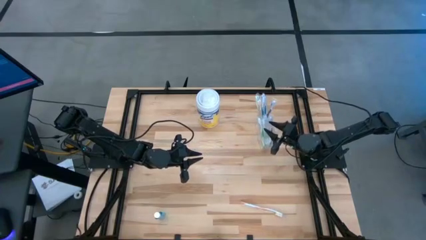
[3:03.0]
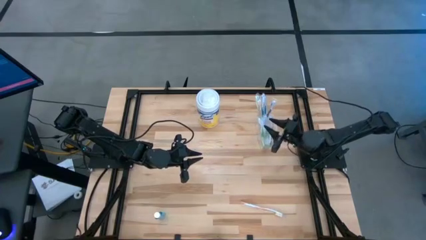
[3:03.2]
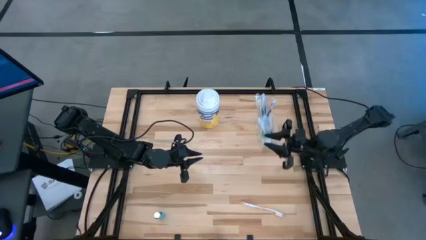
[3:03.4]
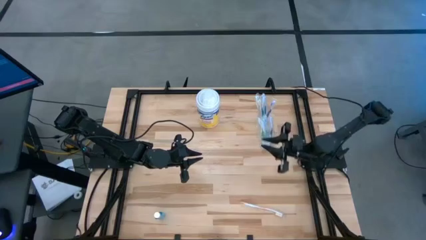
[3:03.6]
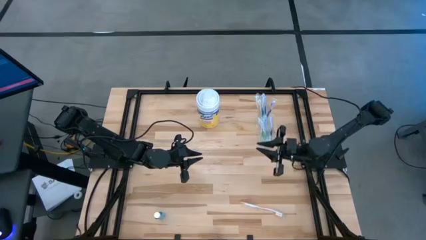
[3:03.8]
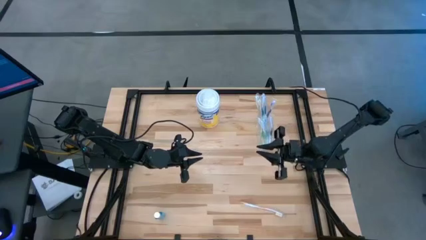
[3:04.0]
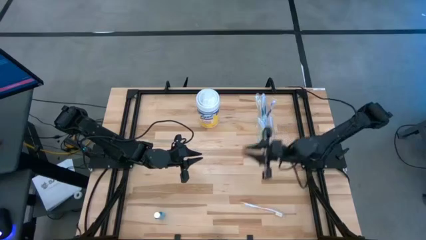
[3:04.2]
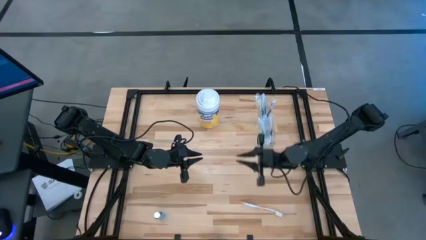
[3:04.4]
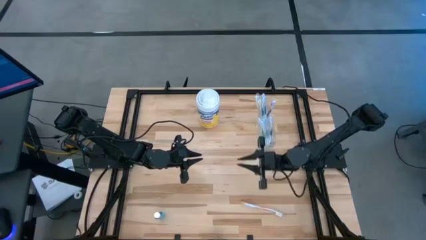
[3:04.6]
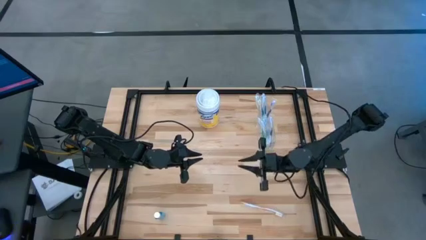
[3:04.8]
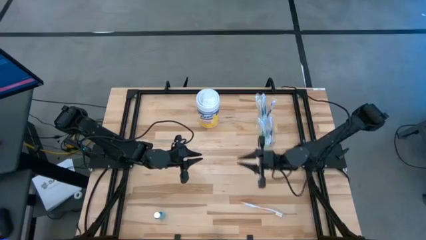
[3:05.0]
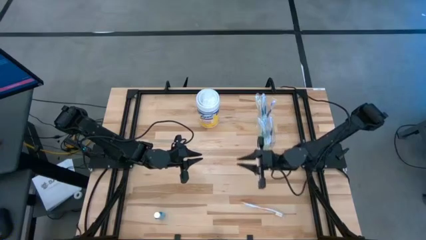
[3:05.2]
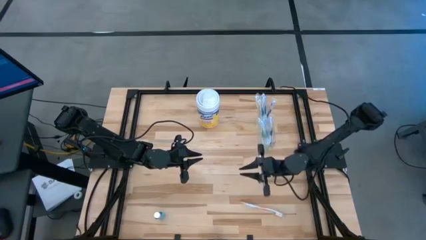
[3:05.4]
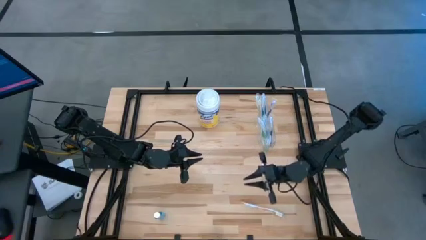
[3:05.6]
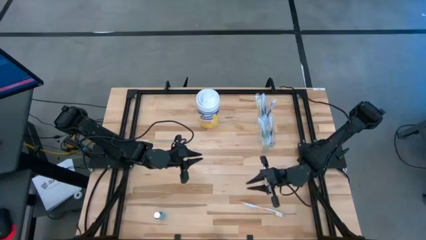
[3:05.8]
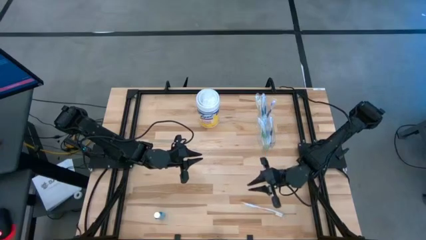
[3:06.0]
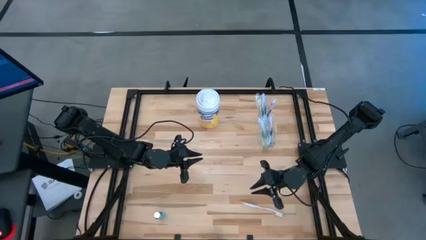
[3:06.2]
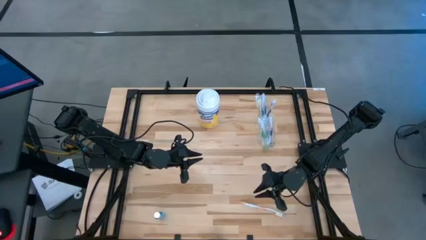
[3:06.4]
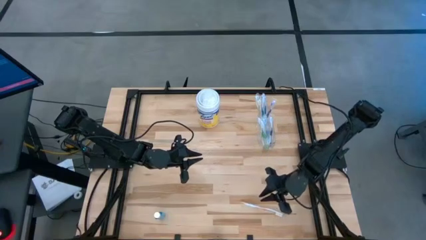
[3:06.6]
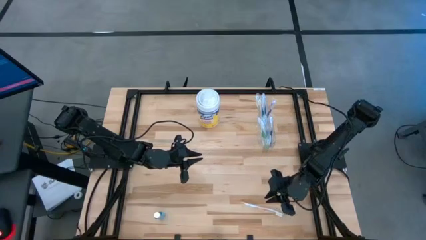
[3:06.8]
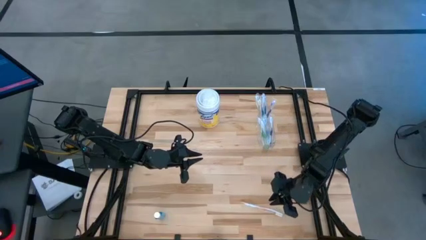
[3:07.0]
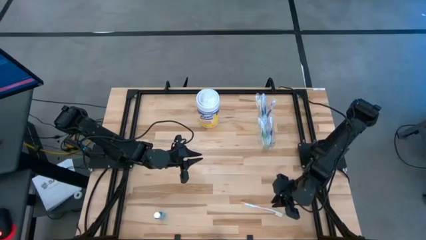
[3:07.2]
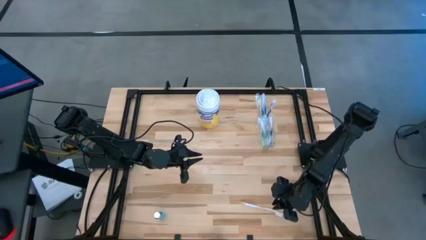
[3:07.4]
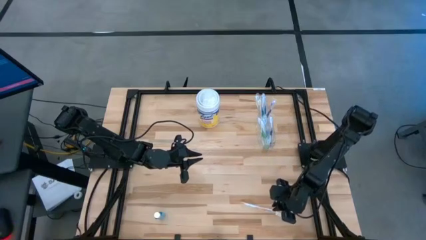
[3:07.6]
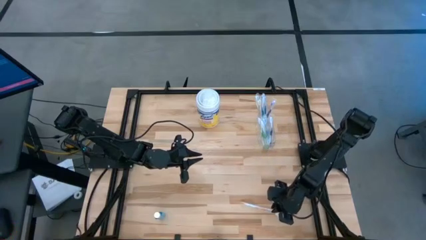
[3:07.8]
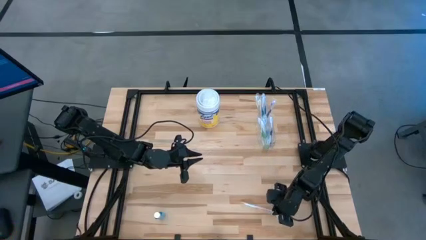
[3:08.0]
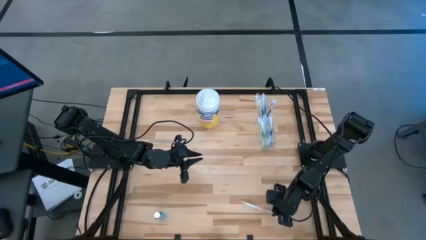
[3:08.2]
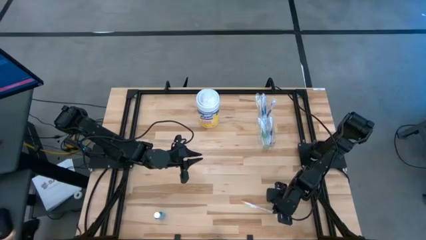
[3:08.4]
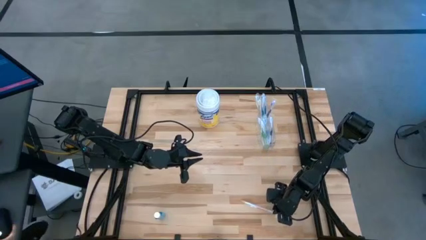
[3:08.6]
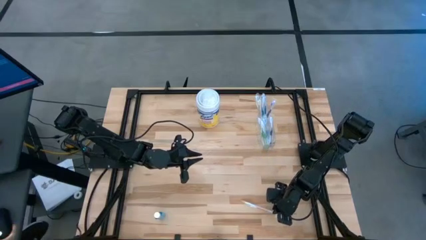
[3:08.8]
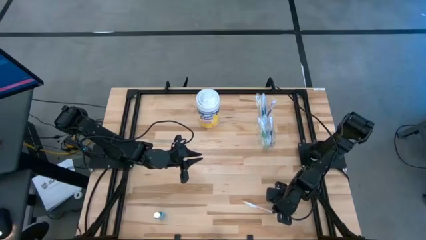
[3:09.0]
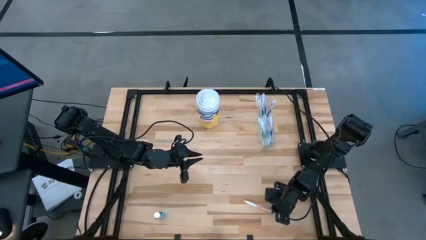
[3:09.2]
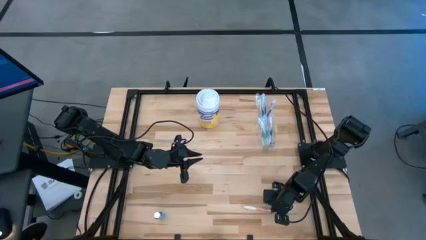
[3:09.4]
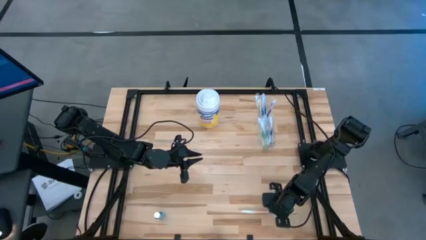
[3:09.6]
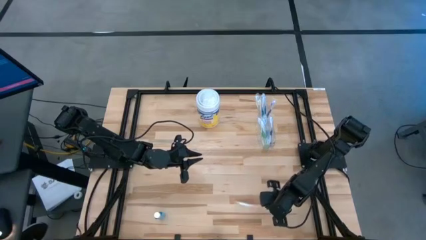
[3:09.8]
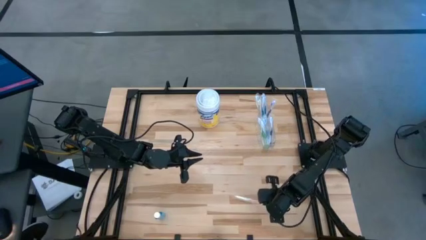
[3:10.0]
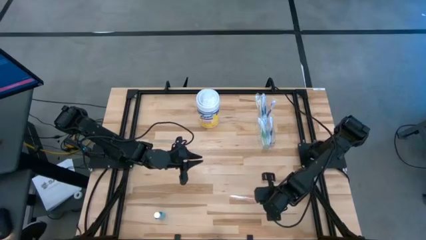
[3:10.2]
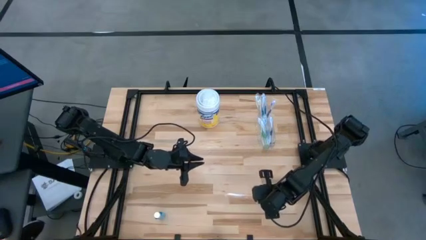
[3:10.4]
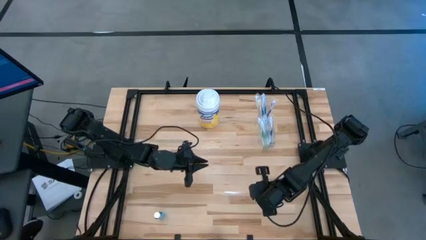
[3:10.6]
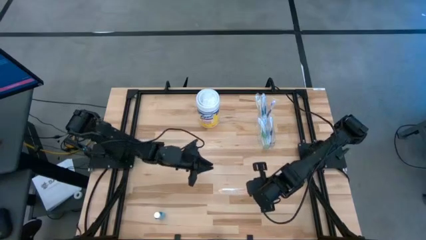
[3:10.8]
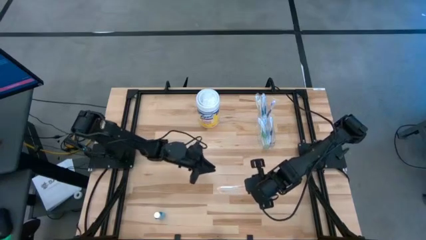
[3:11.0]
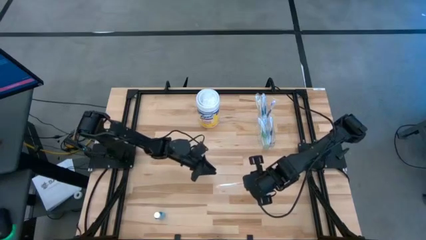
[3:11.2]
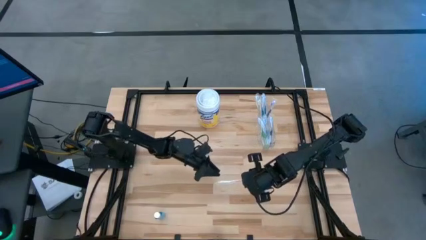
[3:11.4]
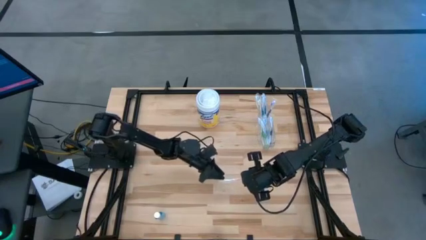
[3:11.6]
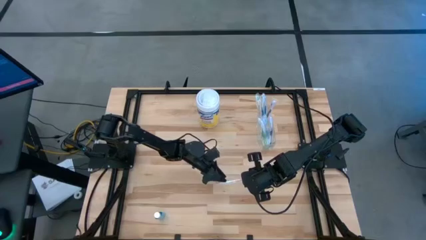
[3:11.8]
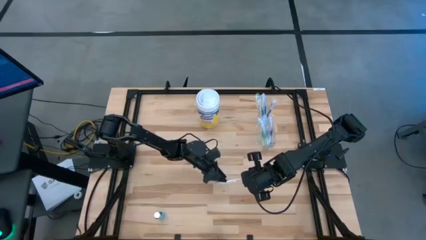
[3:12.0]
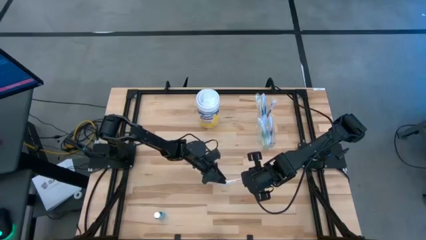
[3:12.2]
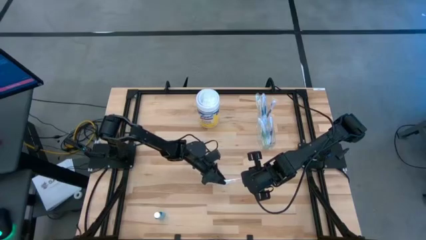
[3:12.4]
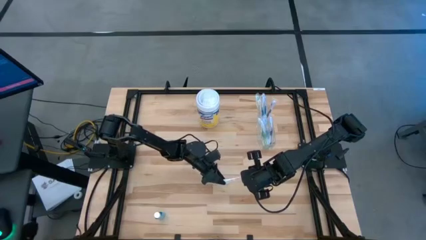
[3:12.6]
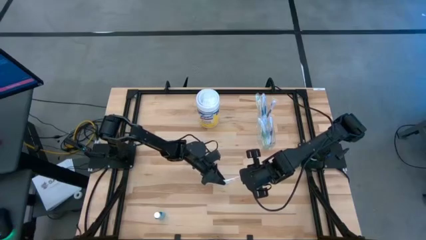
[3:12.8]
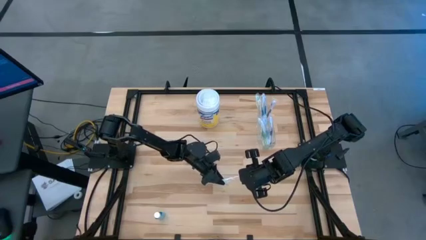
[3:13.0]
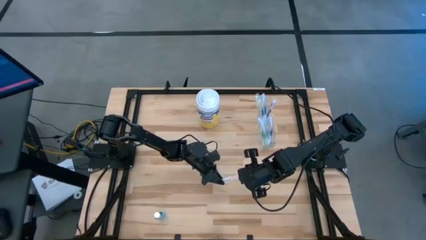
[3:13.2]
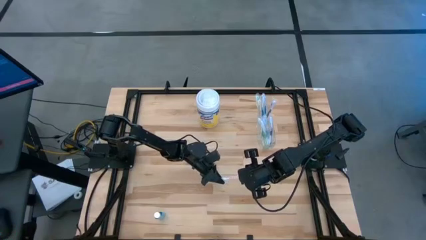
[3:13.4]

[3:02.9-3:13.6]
Task: Pick & Place toothbrushing station
Put the orange toothbrush into the transparent organizer

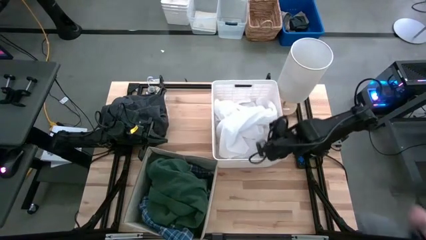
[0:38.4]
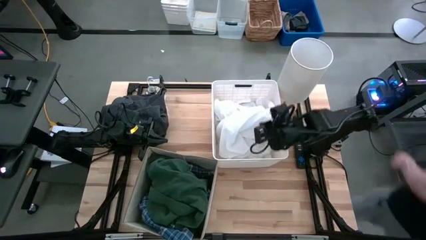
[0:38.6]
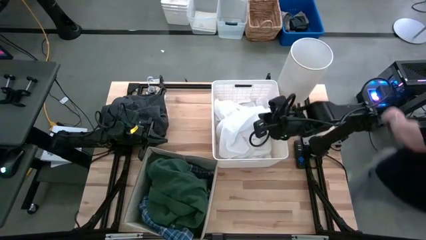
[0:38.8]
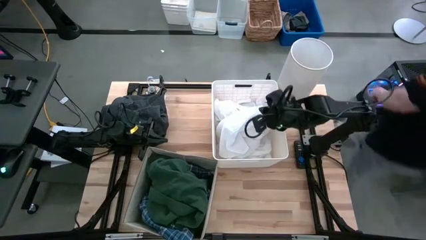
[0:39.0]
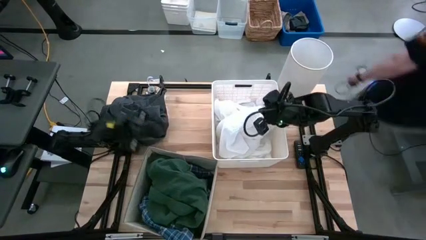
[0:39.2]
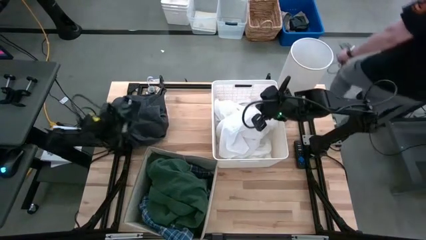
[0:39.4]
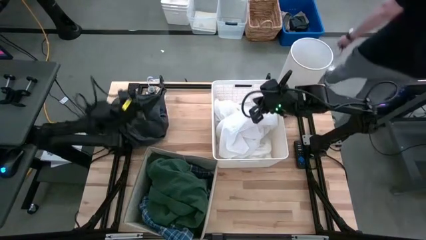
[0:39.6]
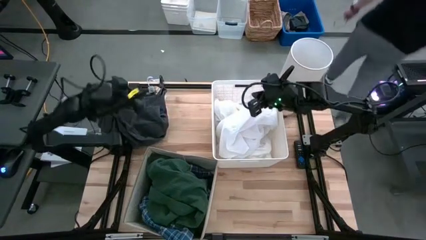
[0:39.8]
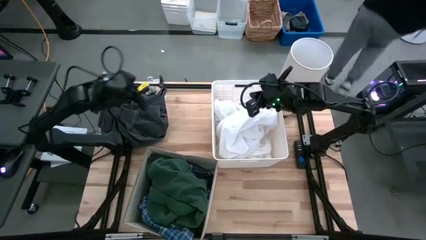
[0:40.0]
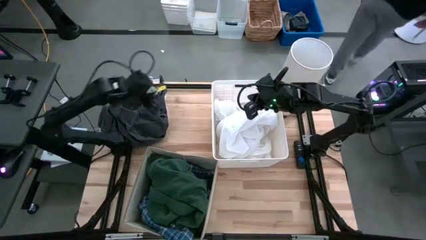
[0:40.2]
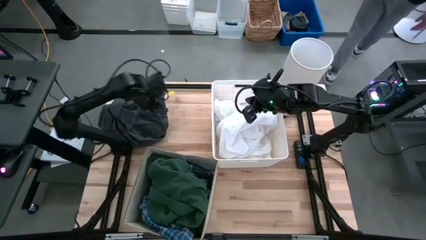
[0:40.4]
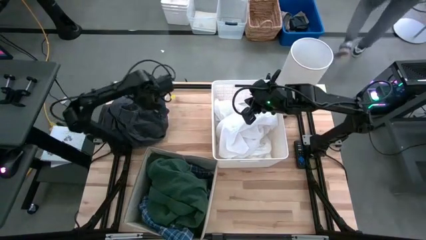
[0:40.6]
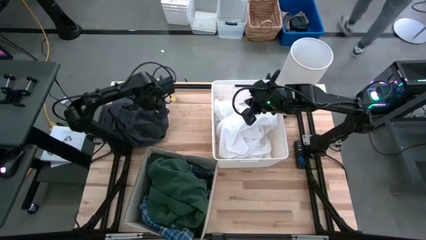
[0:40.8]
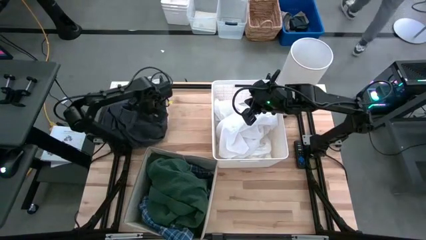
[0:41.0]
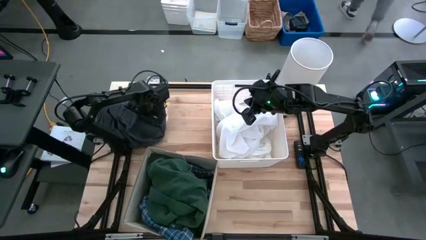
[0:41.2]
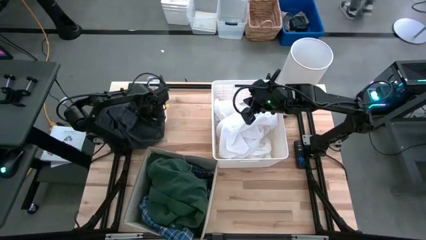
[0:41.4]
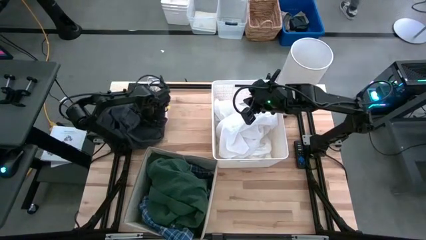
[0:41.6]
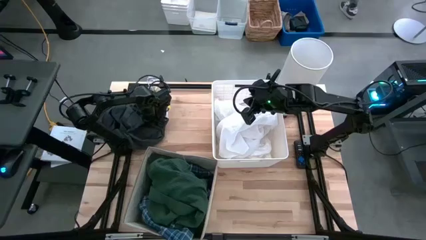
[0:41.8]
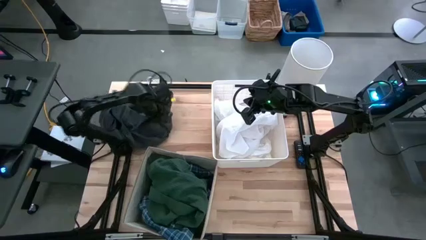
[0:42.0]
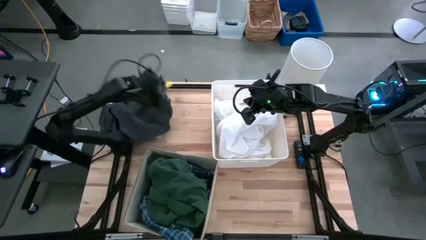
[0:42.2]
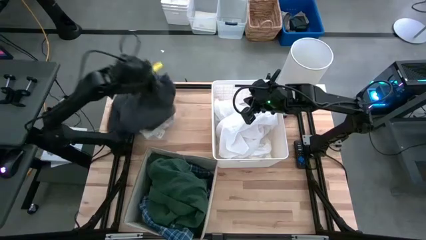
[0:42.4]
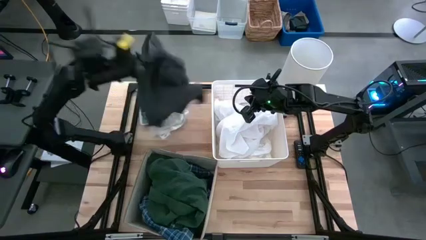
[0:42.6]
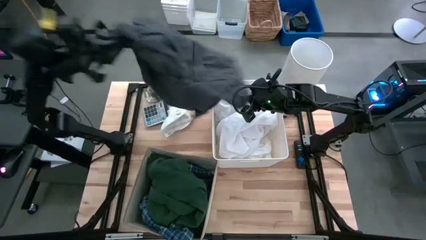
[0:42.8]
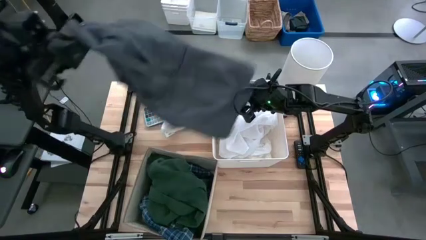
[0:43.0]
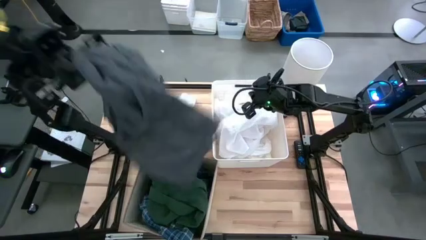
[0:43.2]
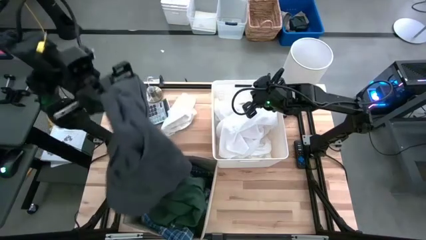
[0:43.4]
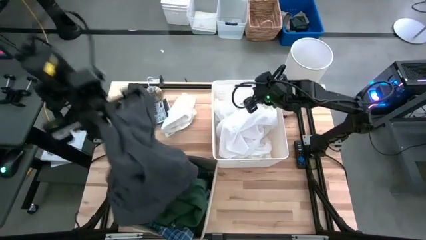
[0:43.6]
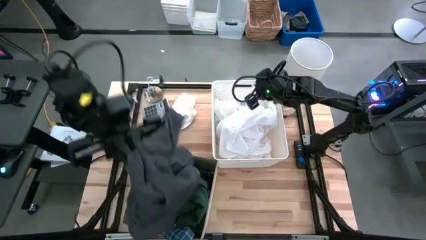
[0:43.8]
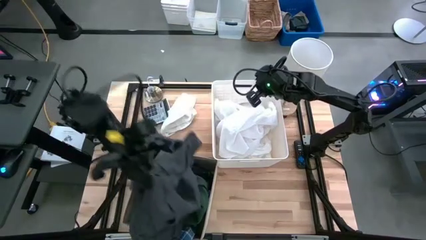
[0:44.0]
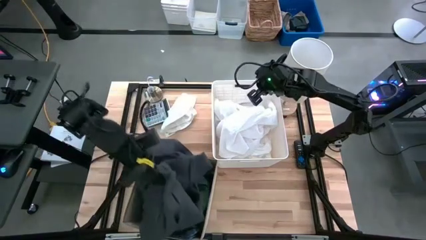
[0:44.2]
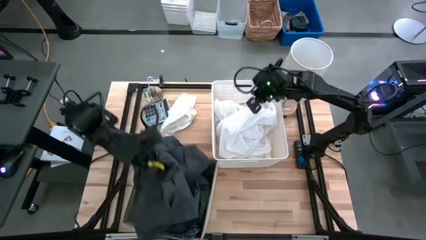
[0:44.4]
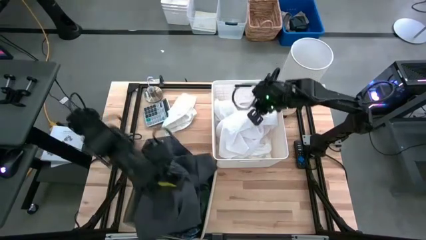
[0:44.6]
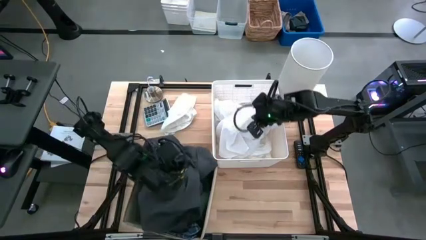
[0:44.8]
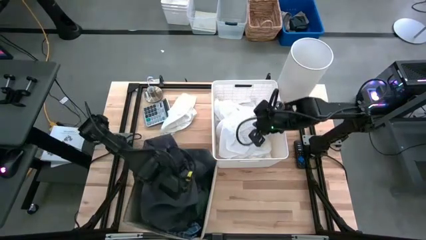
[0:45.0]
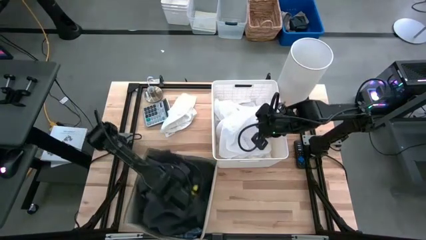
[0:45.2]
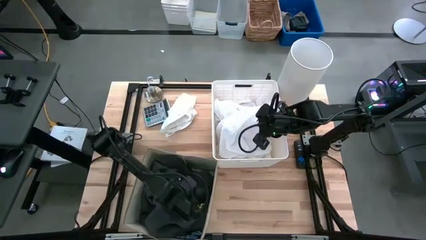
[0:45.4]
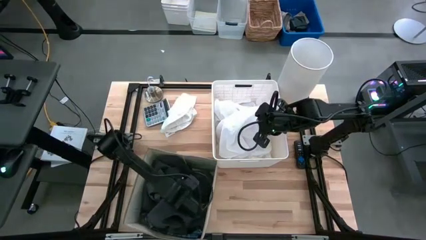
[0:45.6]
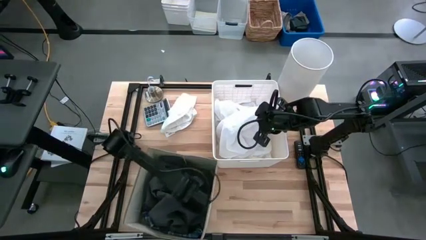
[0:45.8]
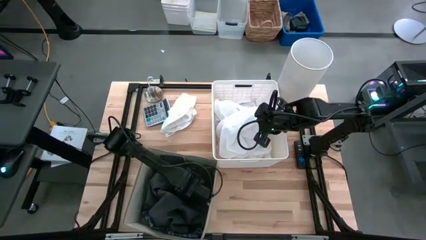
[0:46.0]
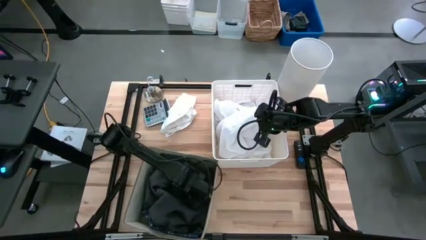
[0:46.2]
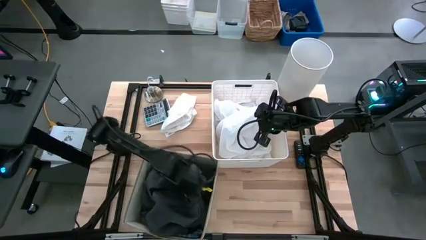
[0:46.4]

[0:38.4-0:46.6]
Task: Sort clothes
Put the gray shorts into the laundry organizer
